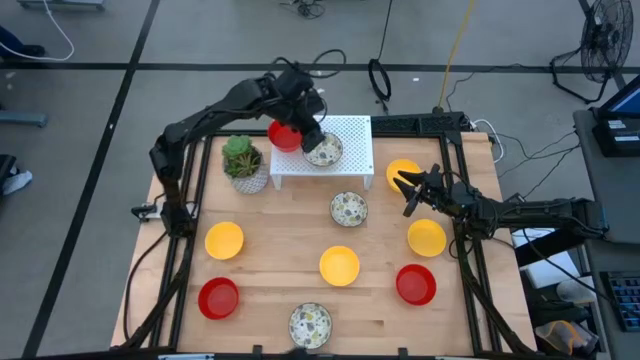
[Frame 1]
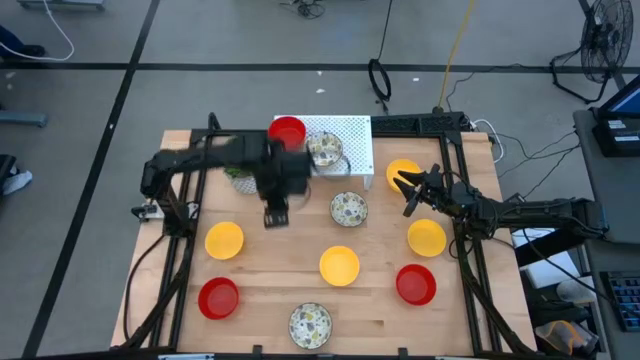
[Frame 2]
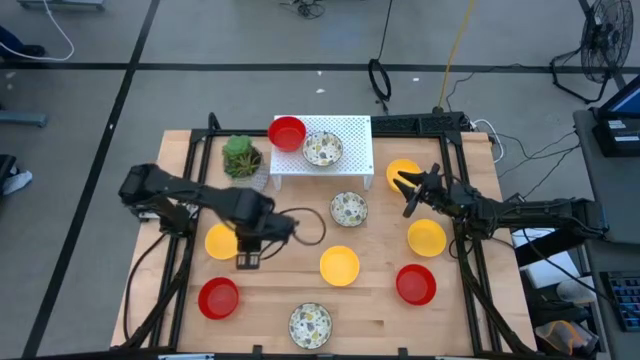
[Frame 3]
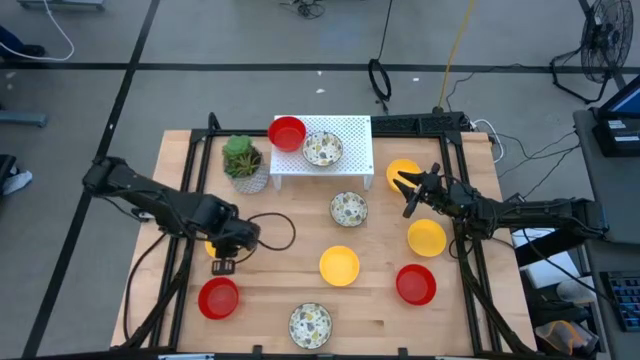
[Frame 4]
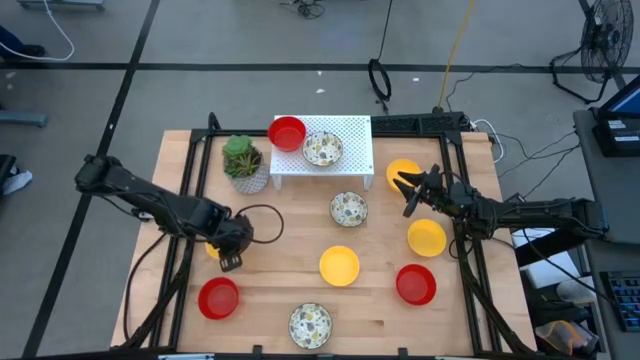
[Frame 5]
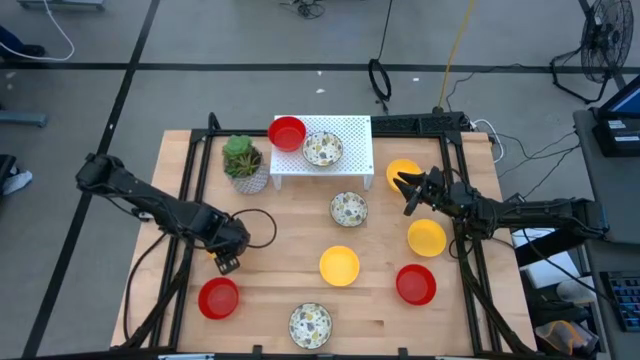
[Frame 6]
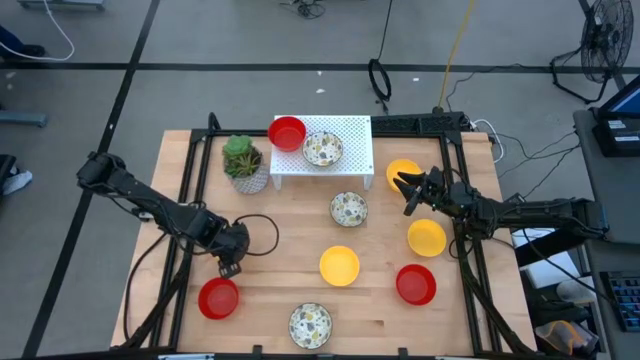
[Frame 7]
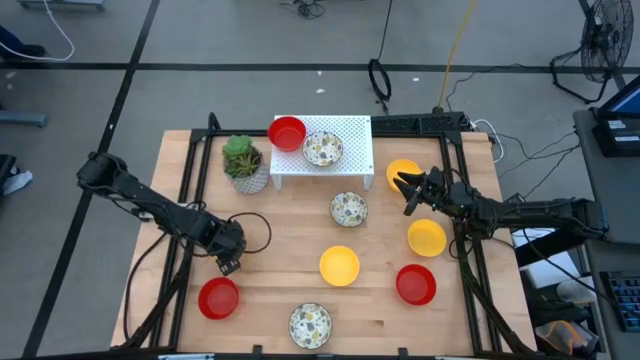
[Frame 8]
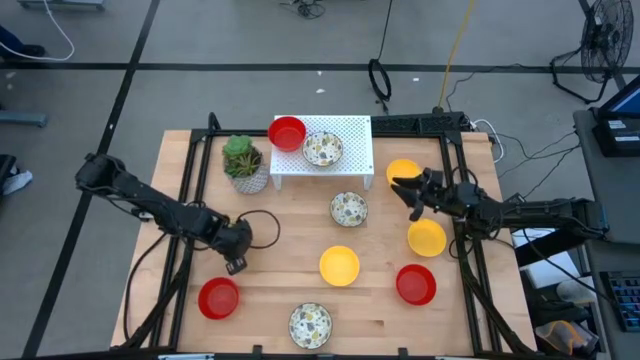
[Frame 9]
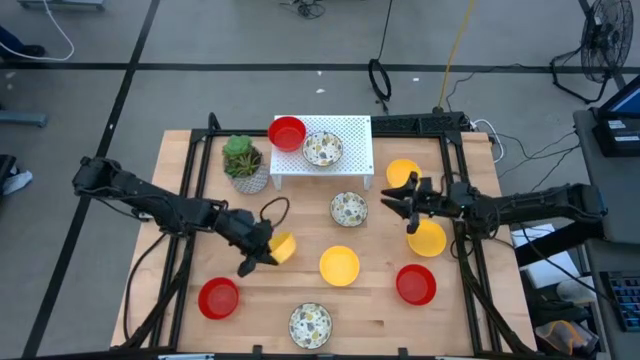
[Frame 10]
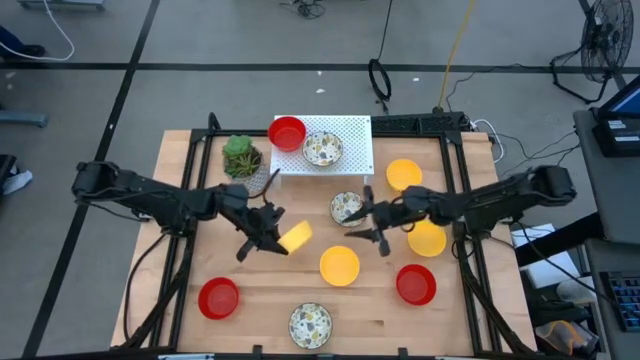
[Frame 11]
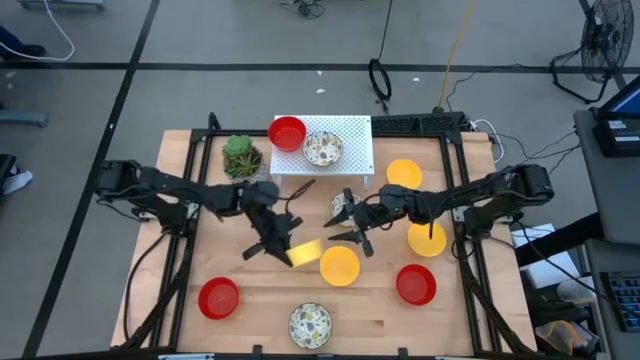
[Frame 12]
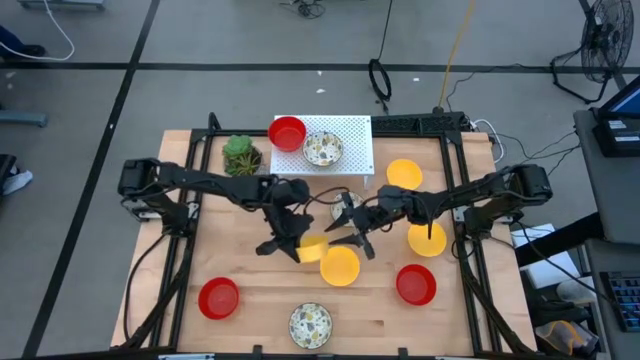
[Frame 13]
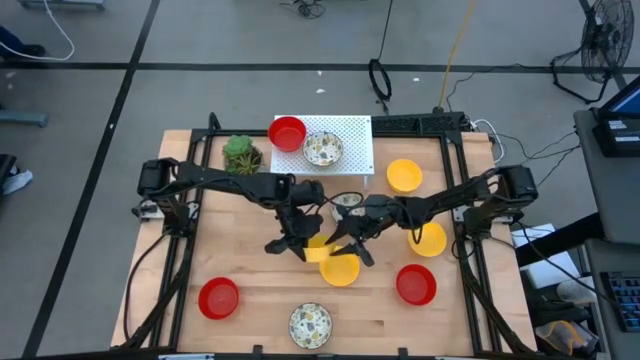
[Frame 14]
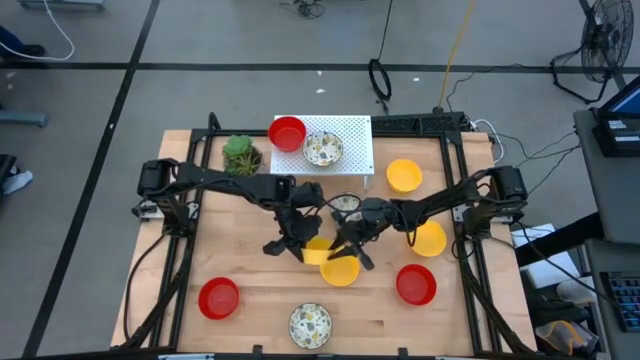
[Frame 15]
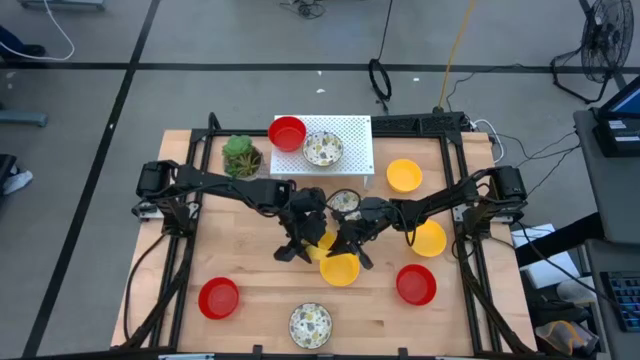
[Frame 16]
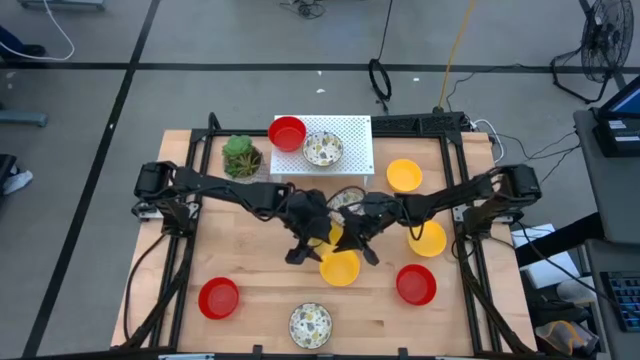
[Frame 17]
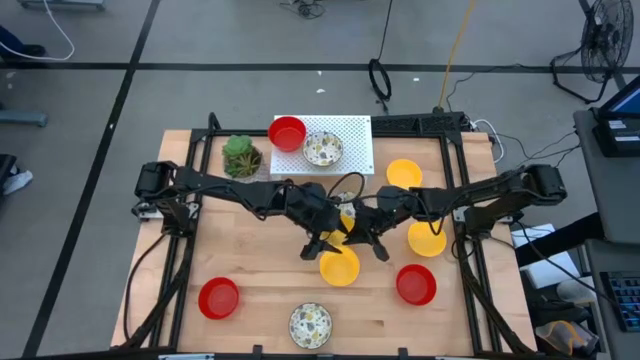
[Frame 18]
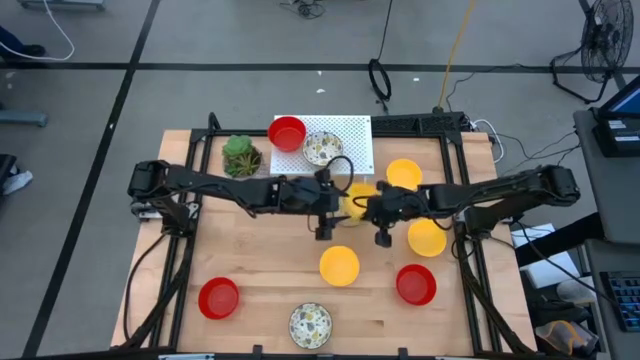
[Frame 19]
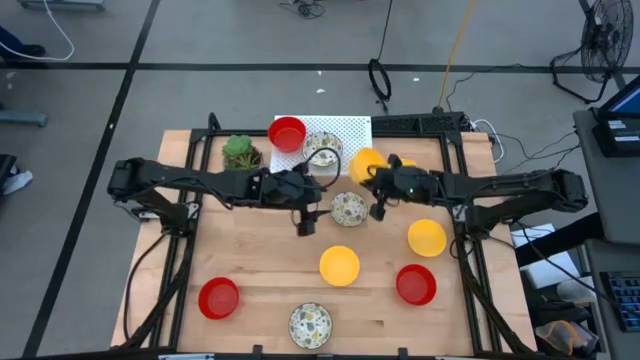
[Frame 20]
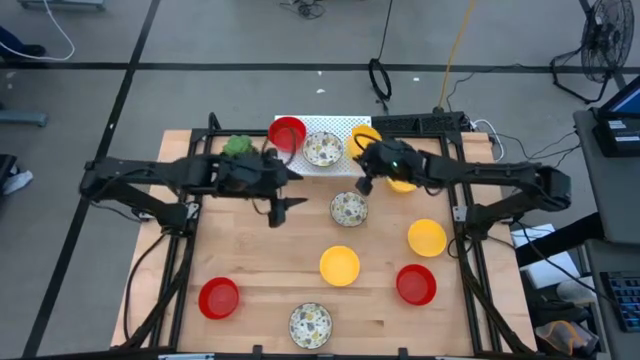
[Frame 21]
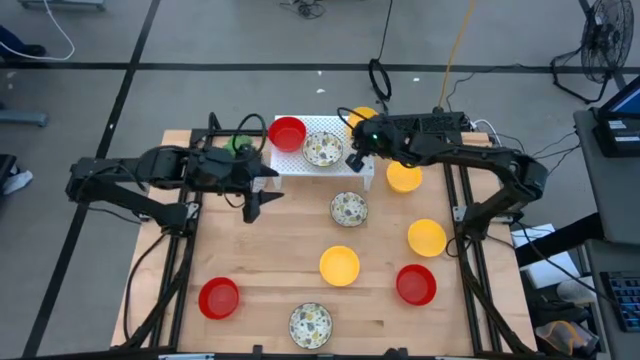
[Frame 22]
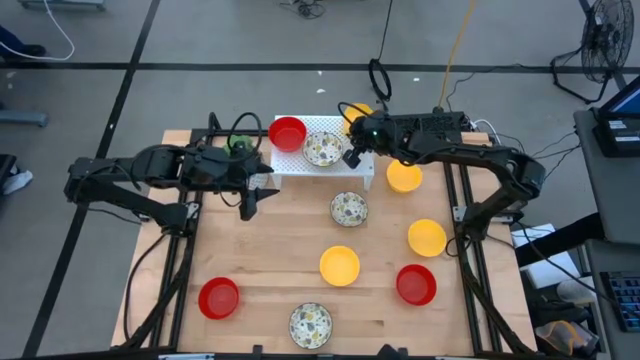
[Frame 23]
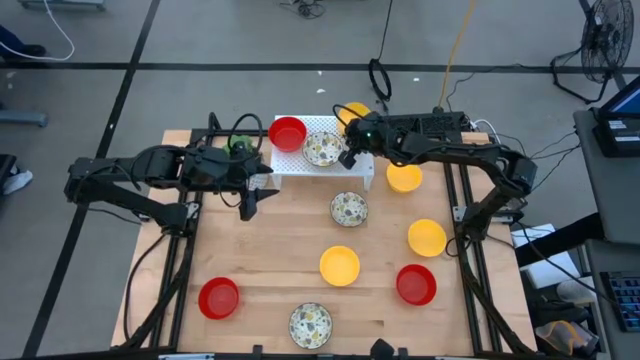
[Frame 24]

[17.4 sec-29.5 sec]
Task: Pick & Place Mini bowls
Put the yellow bowl on the shelf

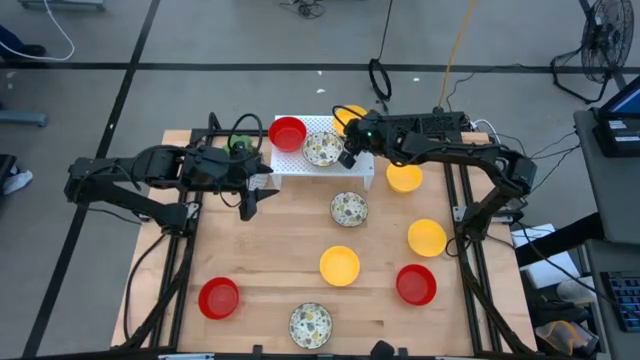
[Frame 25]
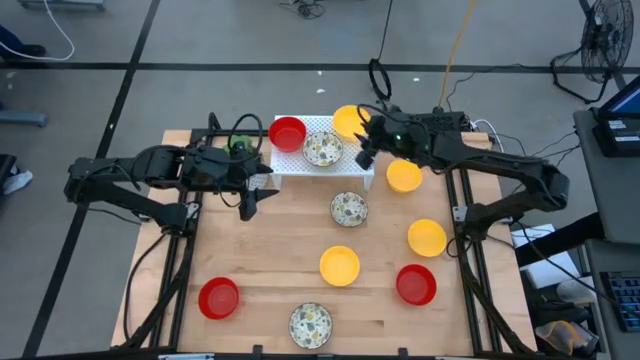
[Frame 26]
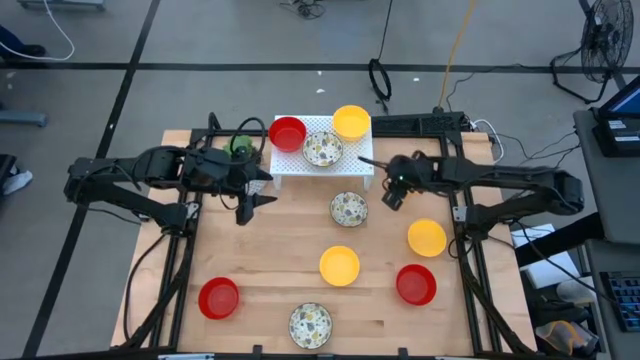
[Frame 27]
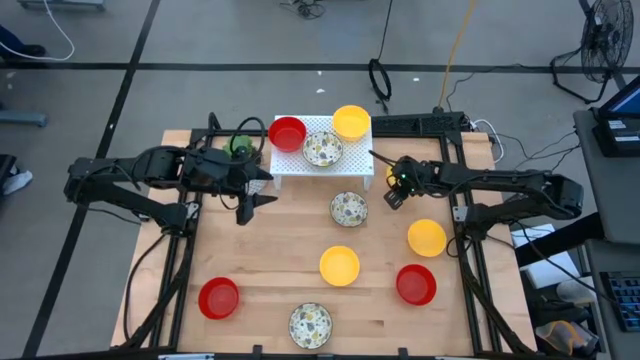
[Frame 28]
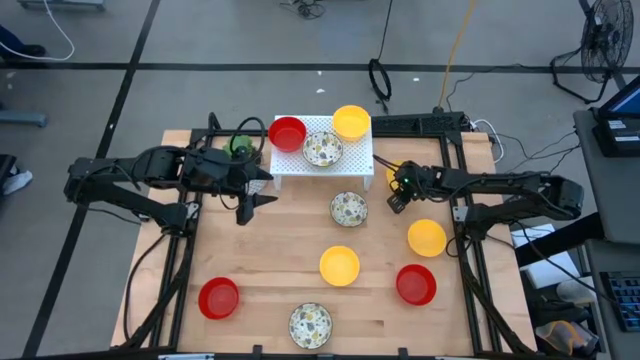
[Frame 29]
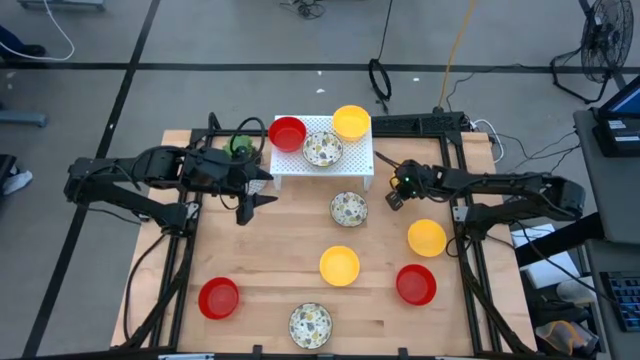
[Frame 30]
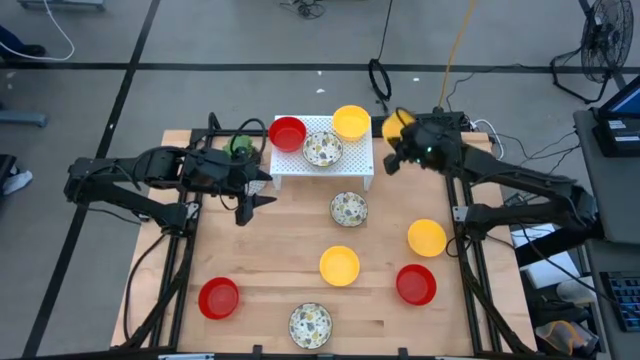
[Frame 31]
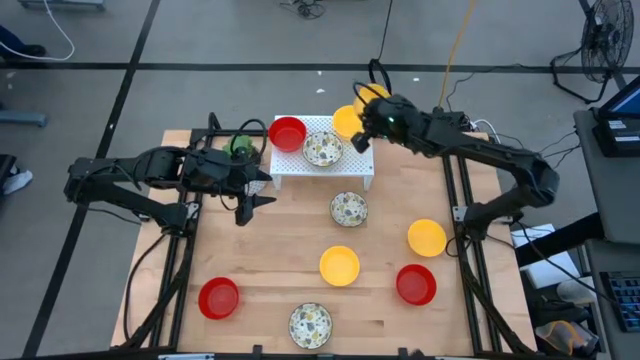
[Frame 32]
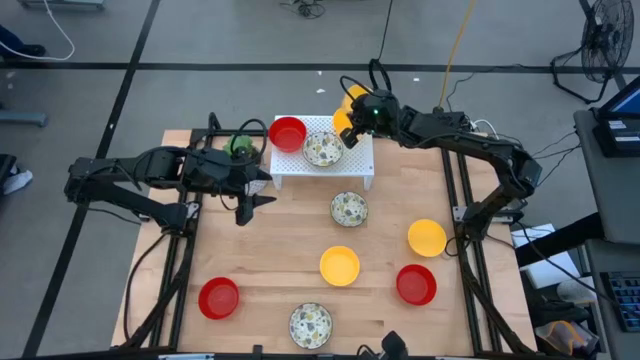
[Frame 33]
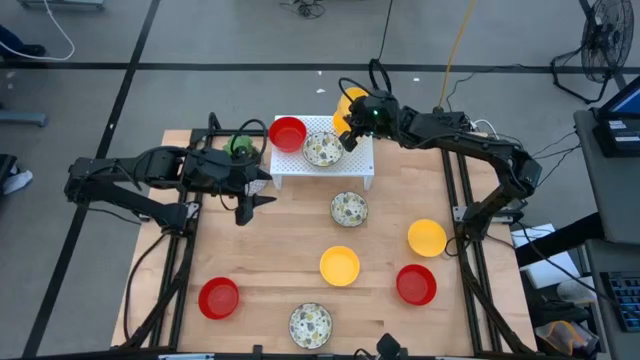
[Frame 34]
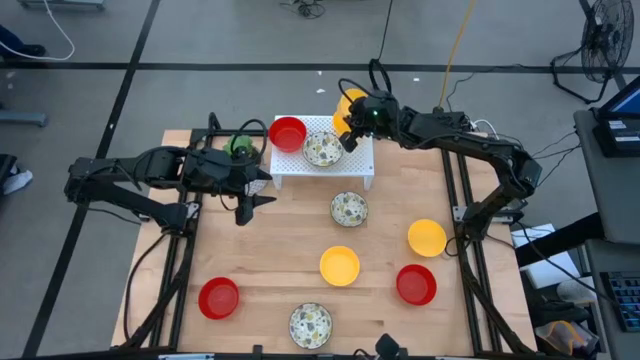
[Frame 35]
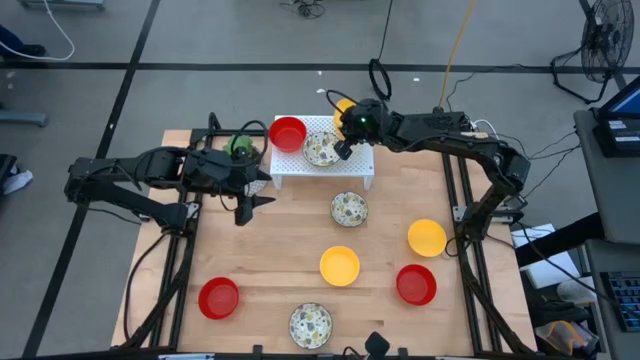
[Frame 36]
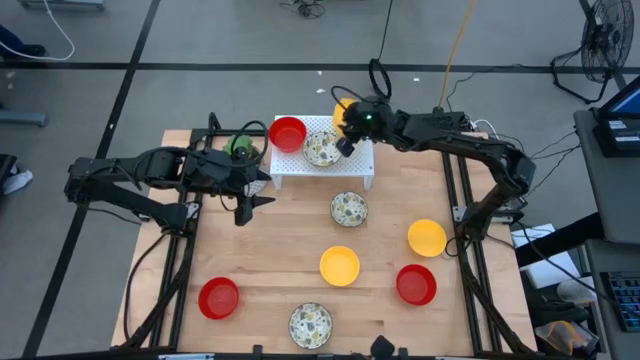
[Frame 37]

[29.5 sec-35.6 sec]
Stack the yellow bowl on the yellow bowl on the shelf

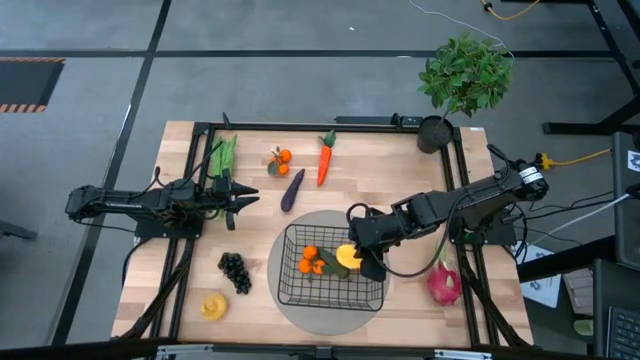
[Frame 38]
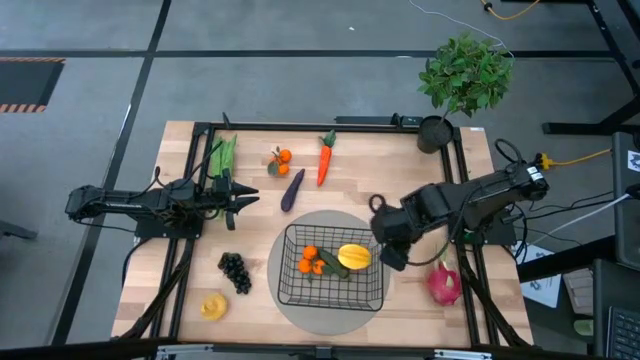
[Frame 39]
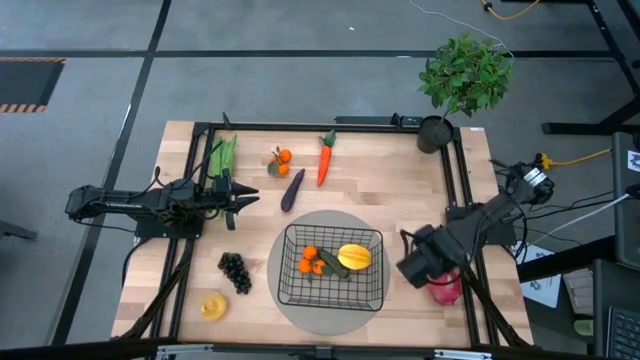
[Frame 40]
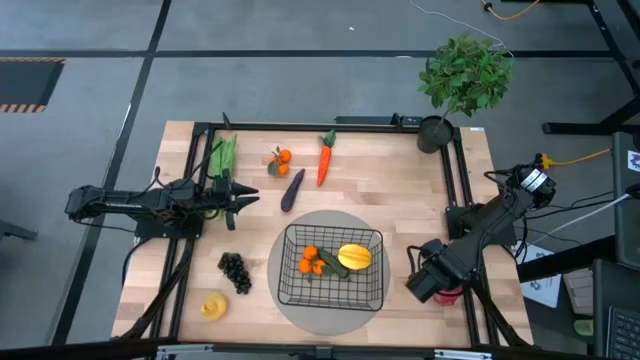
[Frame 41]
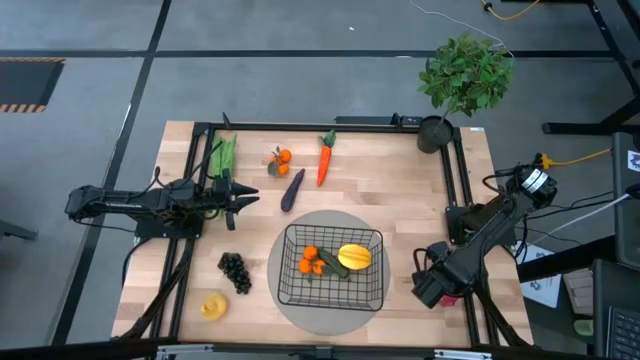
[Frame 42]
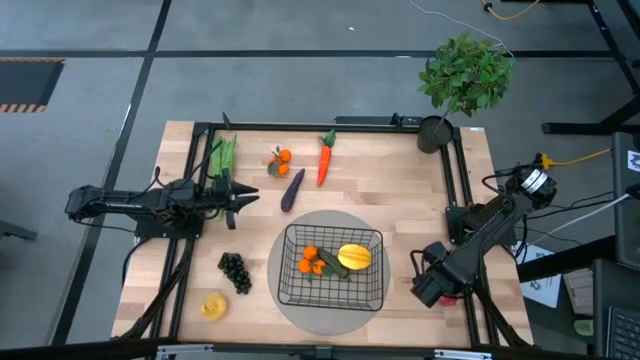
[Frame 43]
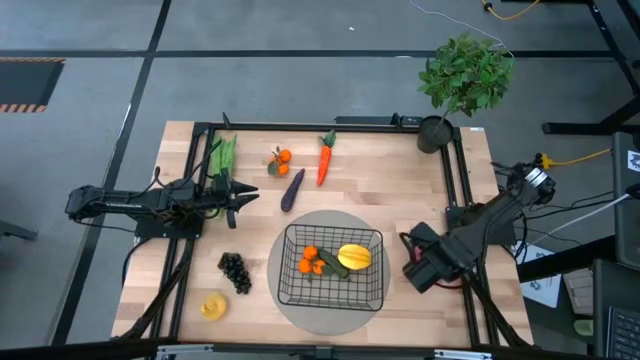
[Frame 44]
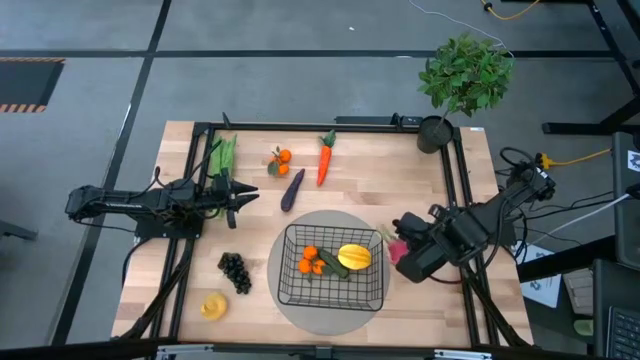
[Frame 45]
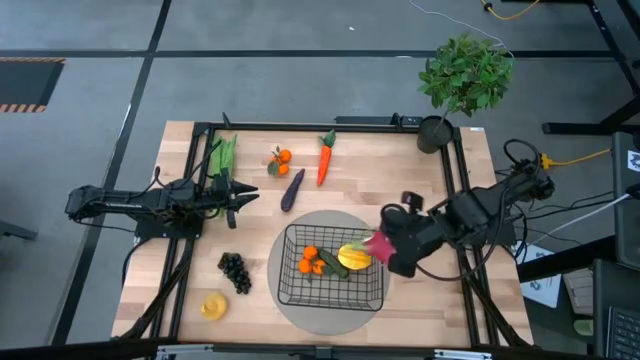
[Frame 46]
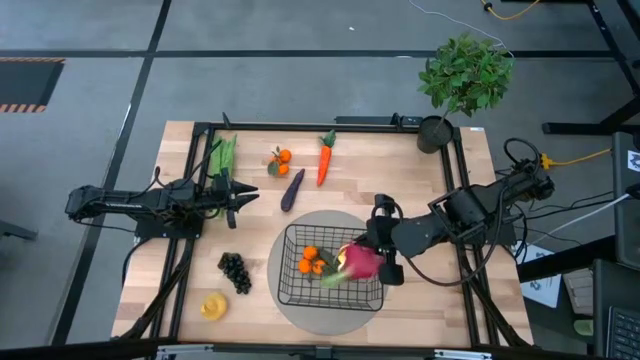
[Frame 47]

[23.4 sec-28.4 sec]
Task: Build produce basket
Put the dragon fruit into the black wire basket
